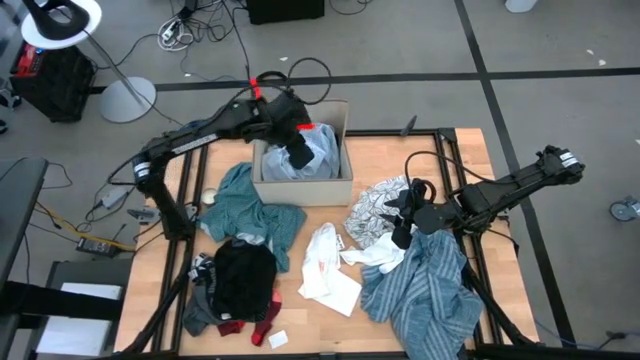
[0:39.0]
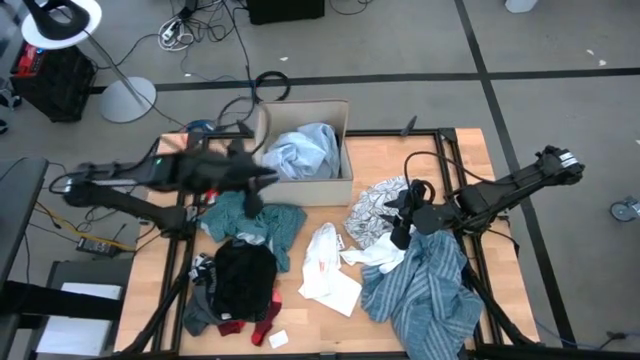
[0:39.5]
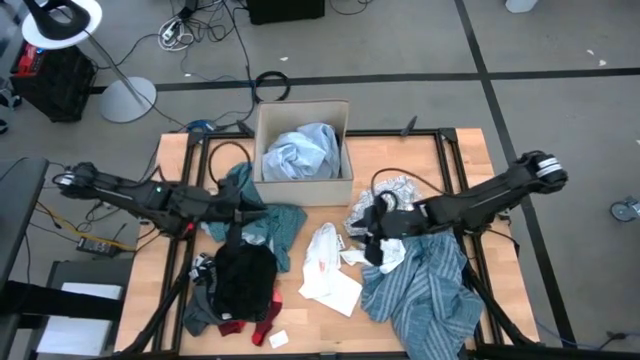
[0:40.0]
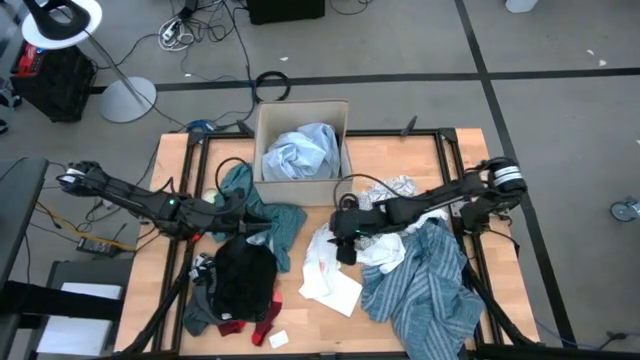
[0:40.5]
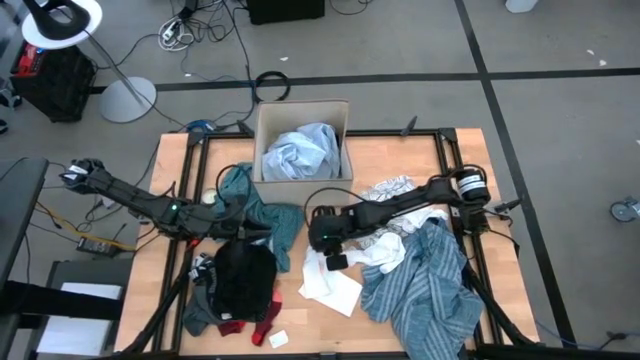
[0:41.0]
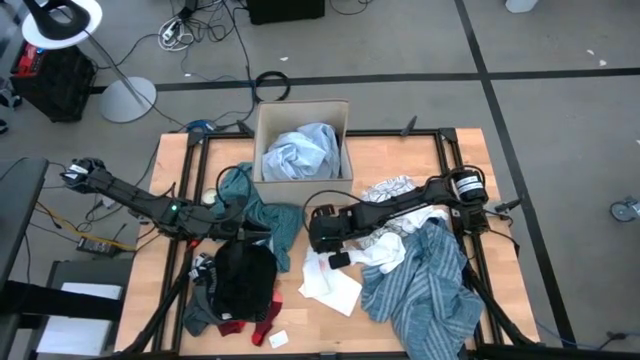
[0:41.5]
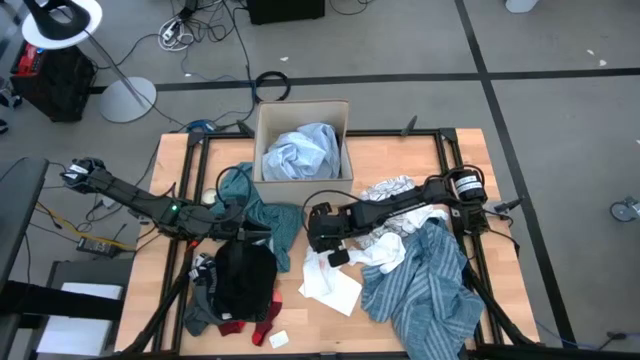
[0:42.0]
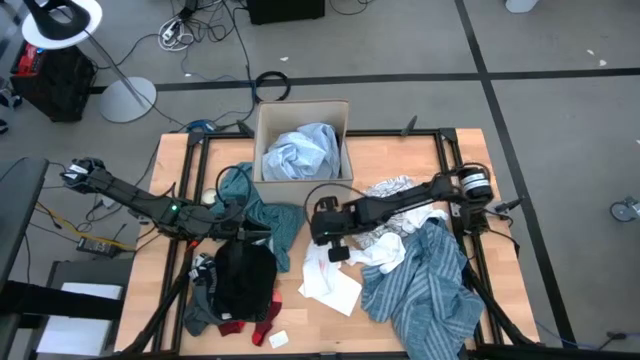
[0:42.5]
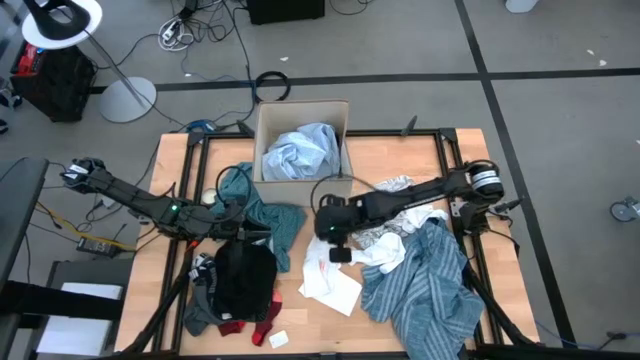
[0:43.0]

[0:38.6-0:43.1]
Task: Sort clothes
Put the white underwear into the laundry organizer

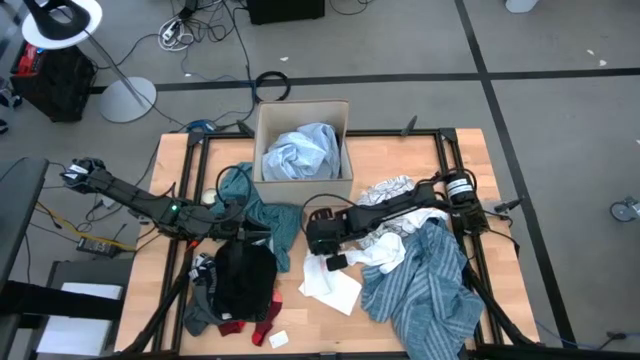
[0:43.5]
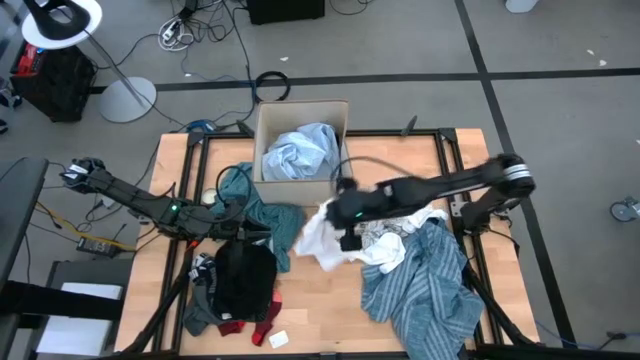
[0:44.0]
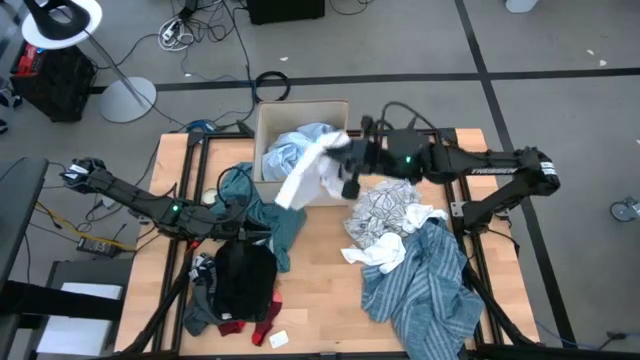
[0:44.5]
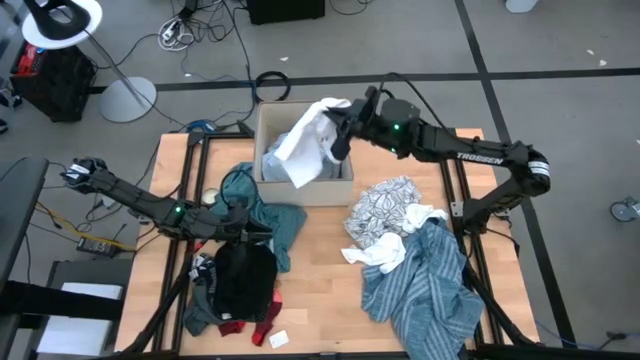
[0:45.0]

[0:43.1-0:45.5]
Put the white underwear into the laundry organizer

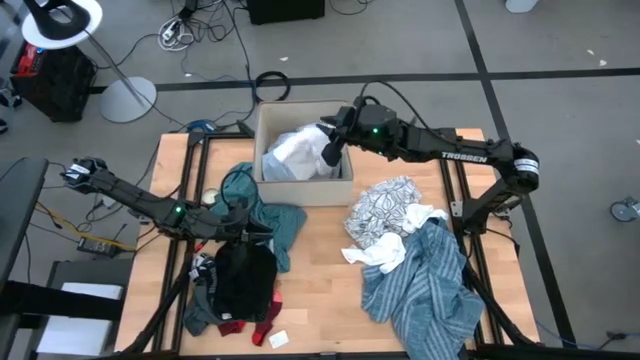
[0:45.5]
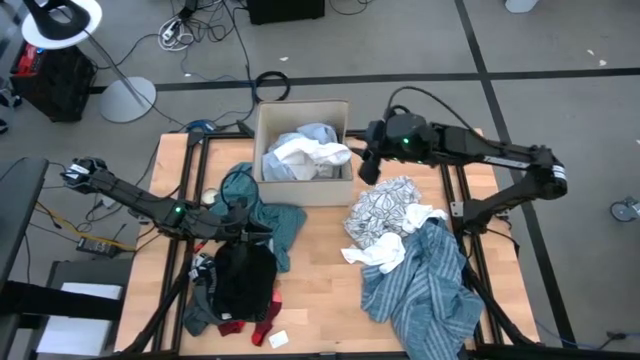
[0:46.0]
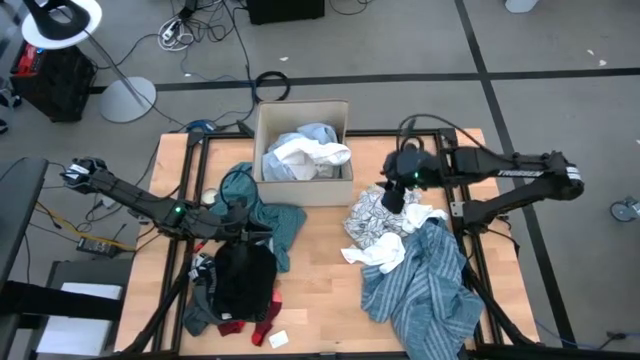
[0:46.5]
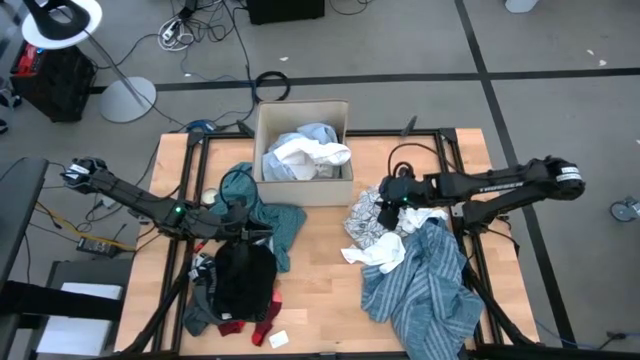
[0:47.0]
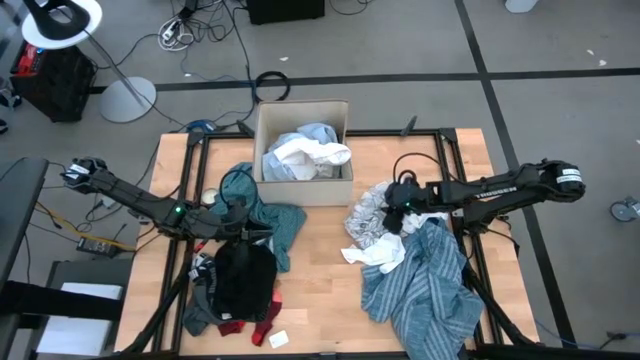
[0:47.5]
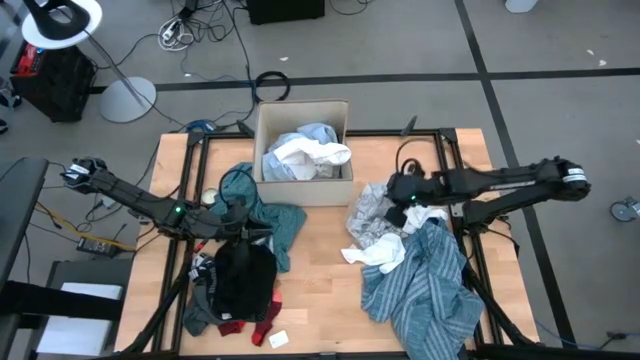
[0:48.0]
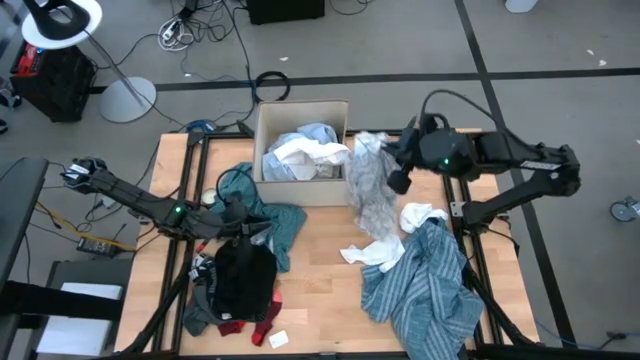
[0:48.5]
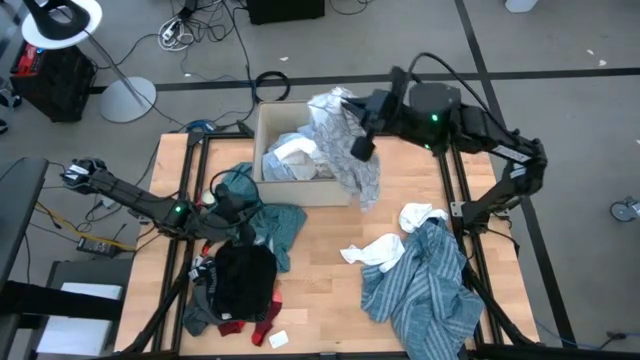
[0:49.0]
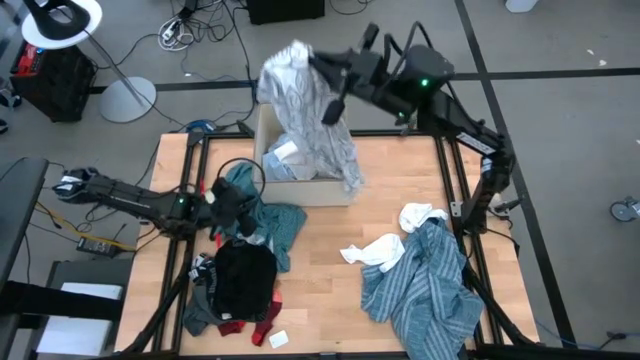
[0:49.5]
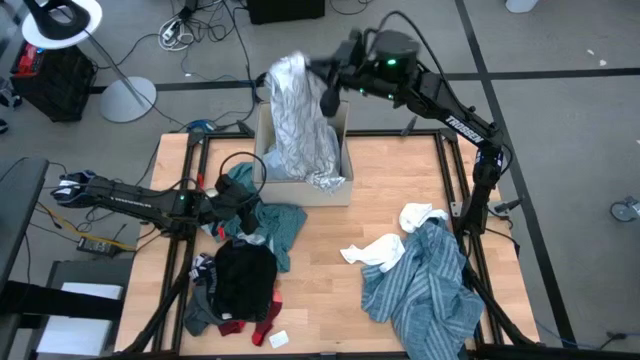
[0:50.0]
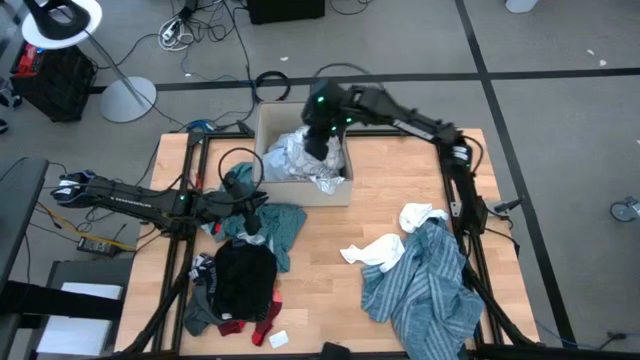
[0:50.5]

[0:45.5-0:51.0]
Put the white shirt into the laundry organizer

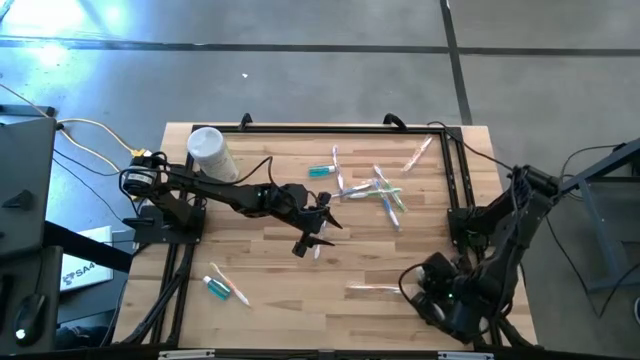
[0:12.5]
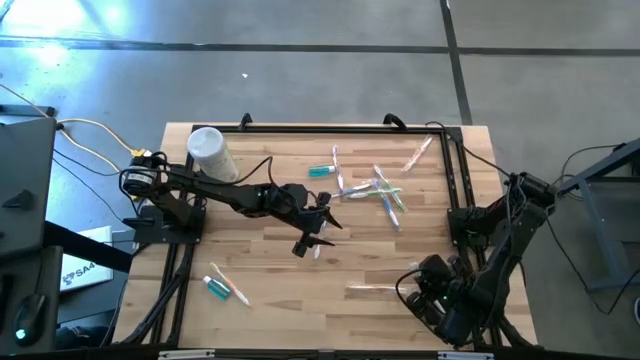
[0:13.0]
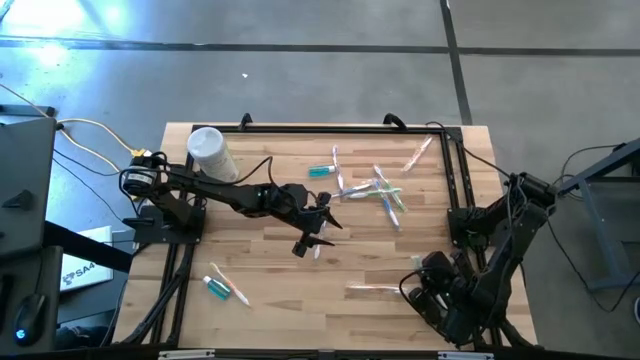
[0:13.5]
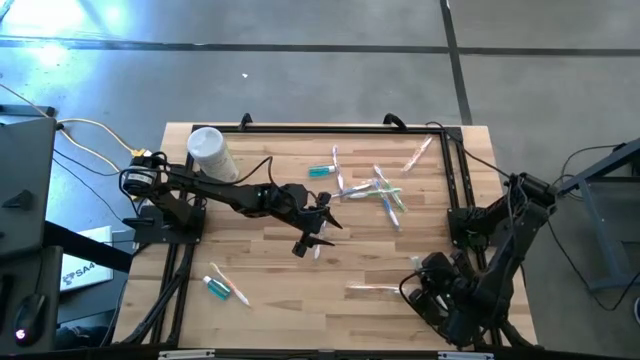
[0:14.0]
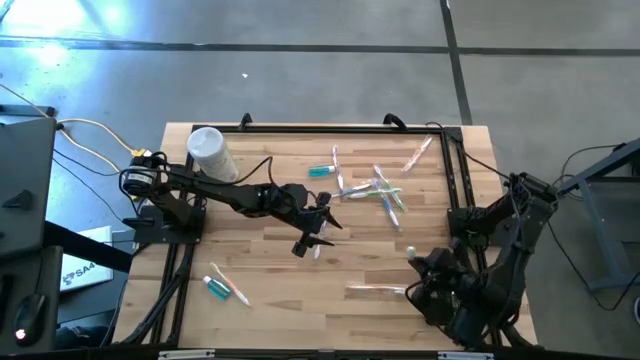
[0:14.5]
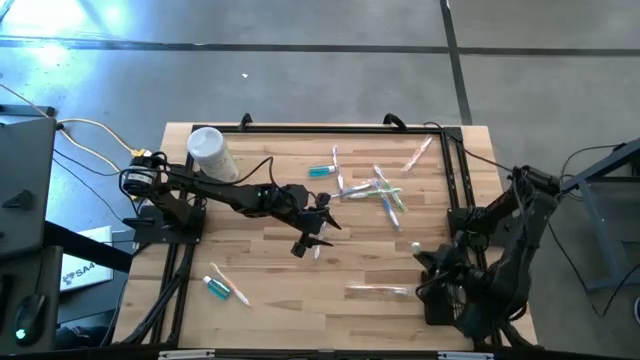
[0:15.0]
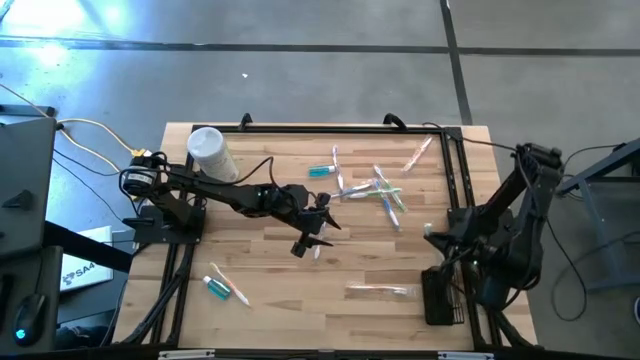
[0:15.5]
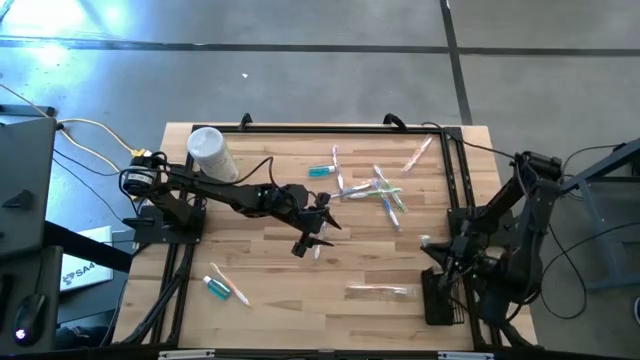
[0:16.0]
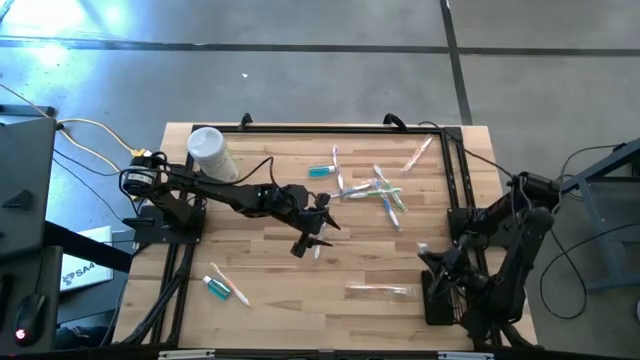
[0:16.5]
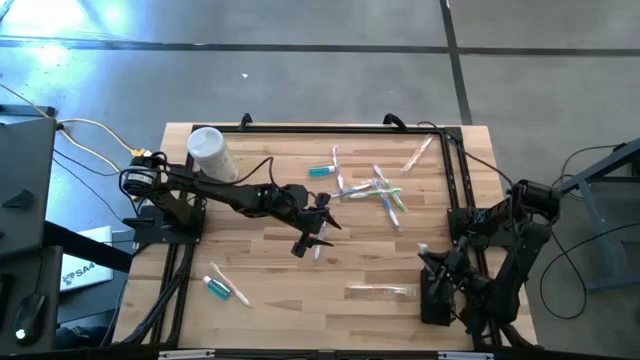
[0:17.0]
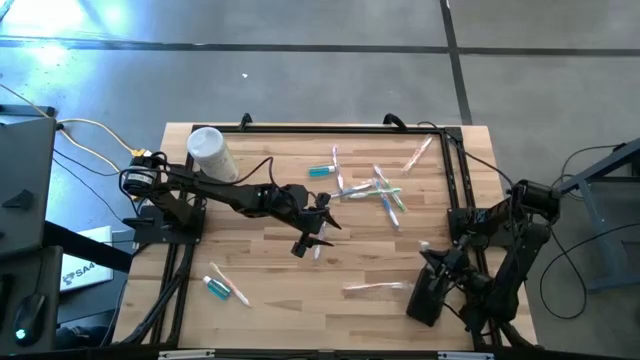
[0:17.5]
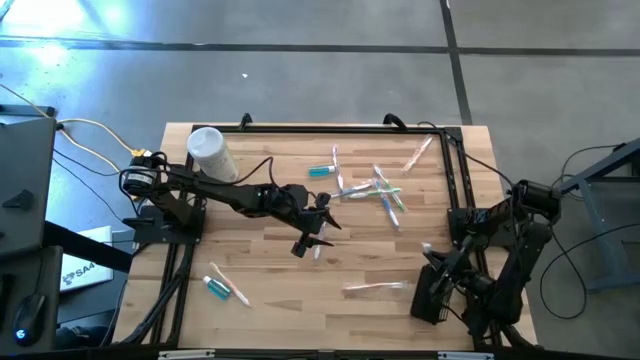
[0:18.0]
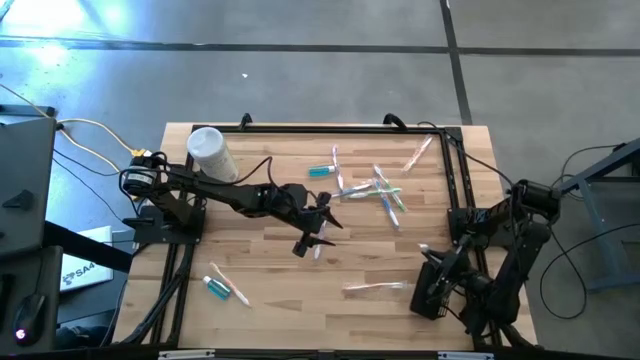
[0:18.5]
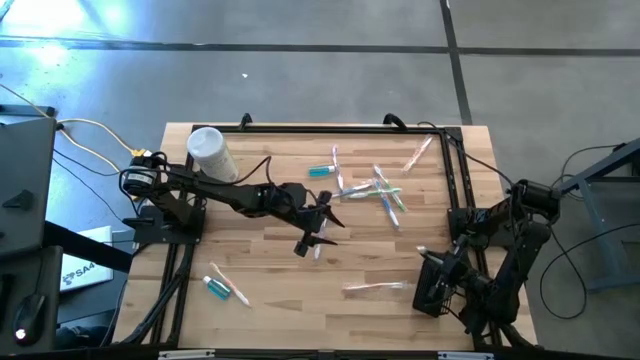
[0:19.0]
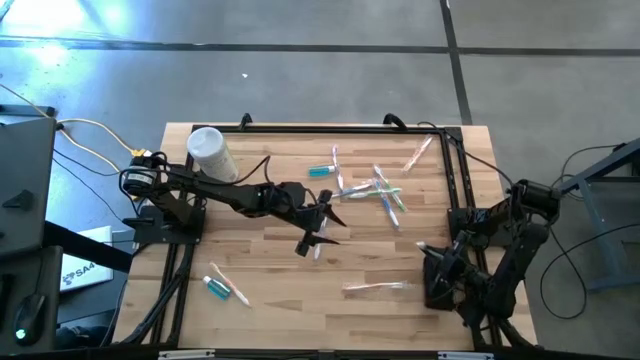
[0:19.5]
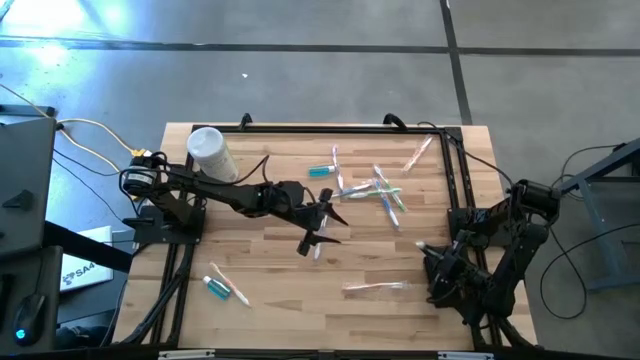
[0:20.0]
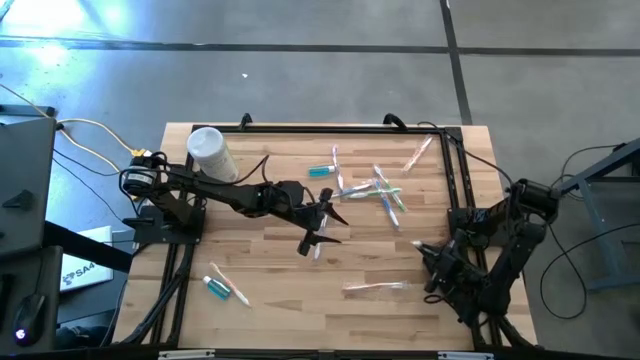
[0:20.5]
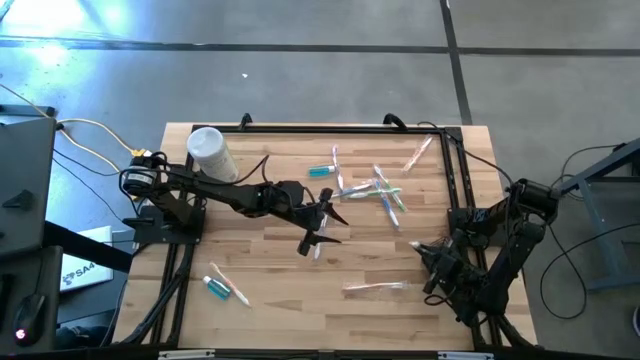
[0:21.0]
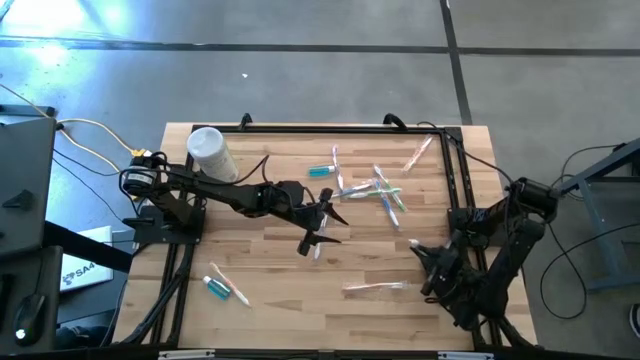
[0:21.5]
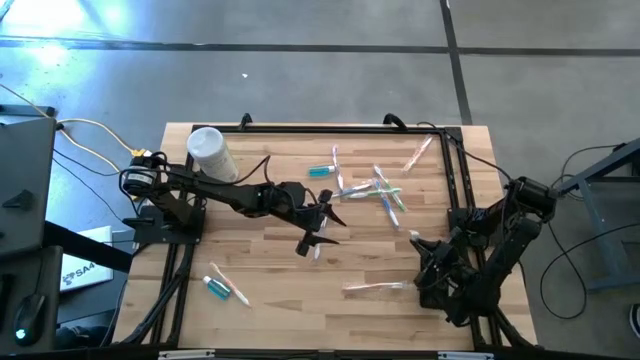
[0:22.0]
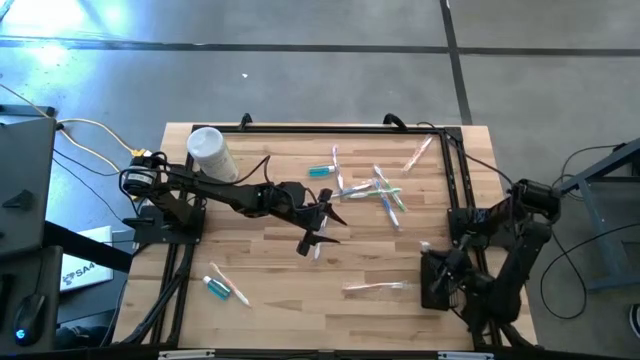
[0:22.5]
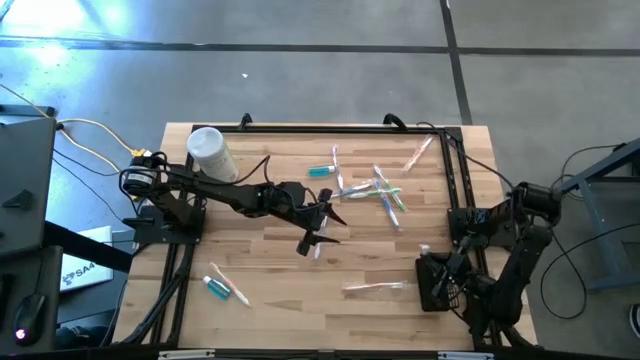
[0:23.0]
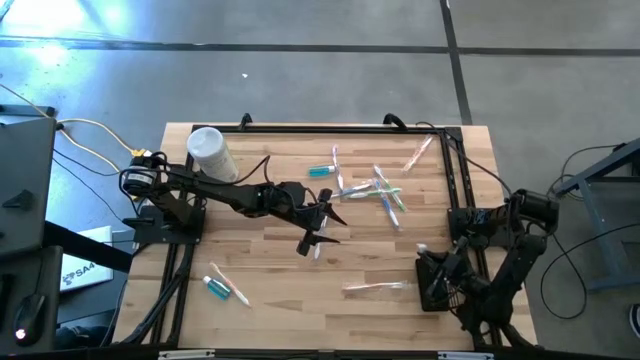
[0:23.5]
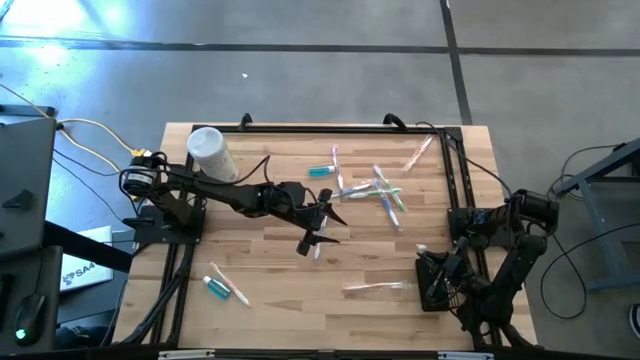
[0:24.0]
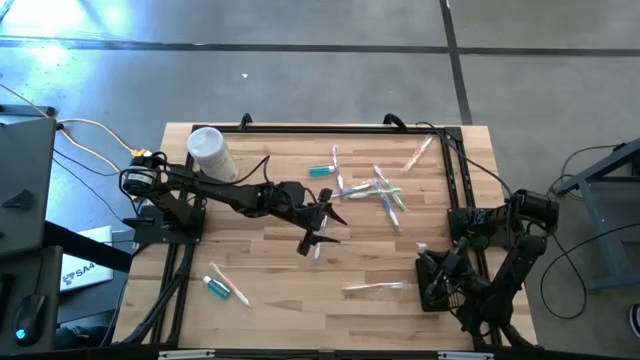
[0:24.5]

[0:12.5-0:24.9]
Task: Pick & Place toothbrushing station
Put the bottom green toothbrush into the black mesh
